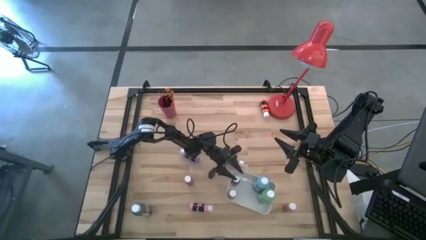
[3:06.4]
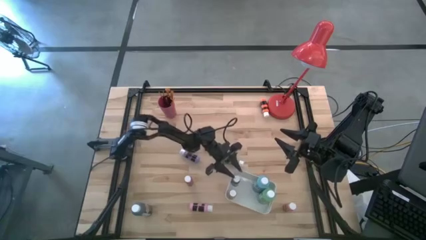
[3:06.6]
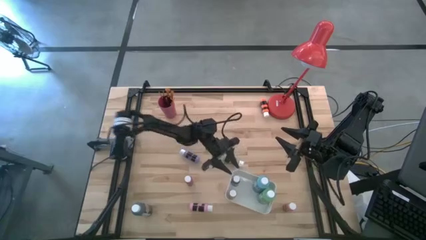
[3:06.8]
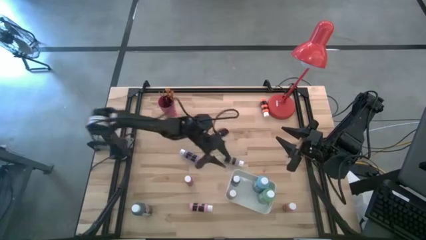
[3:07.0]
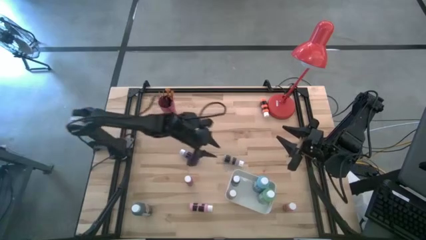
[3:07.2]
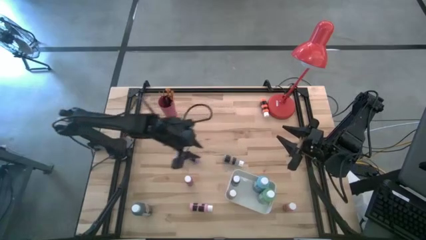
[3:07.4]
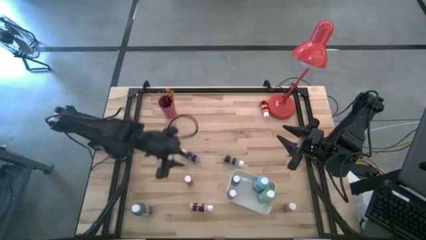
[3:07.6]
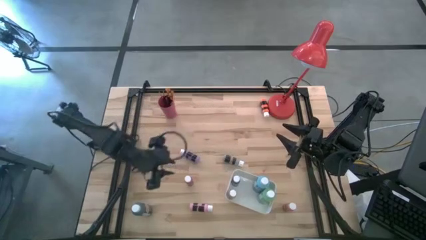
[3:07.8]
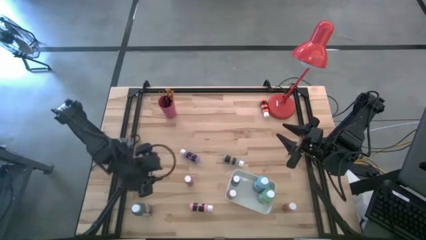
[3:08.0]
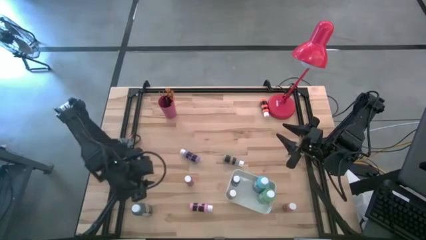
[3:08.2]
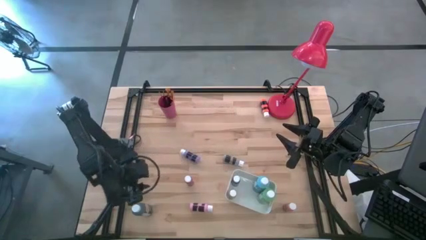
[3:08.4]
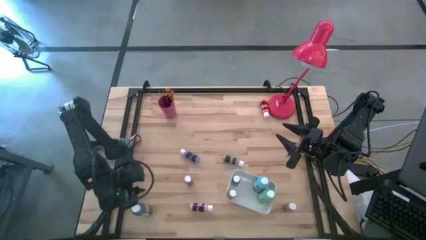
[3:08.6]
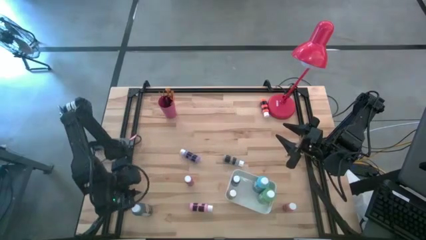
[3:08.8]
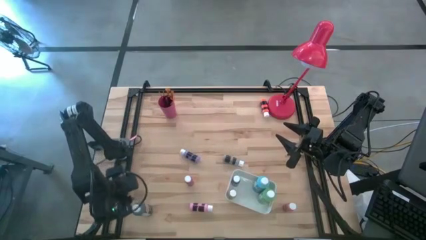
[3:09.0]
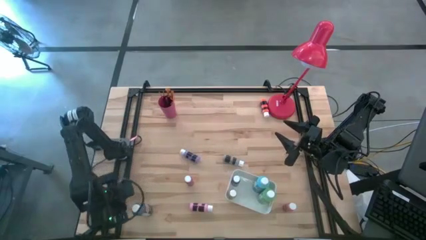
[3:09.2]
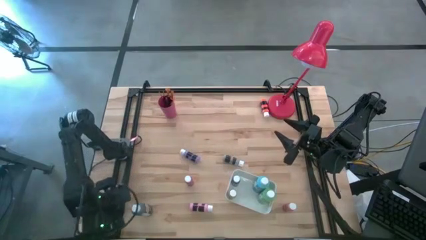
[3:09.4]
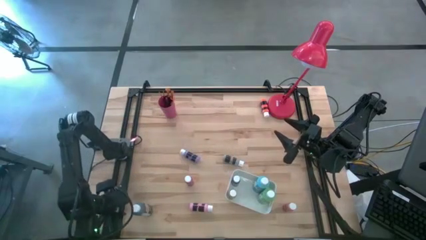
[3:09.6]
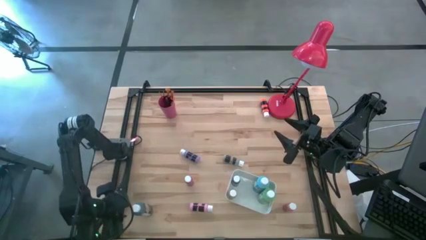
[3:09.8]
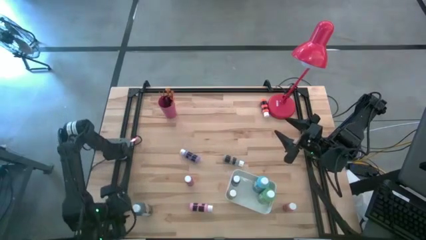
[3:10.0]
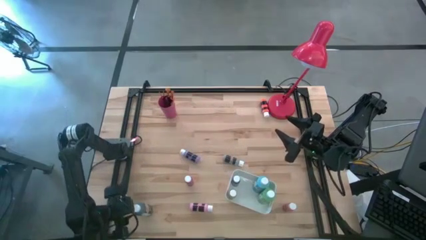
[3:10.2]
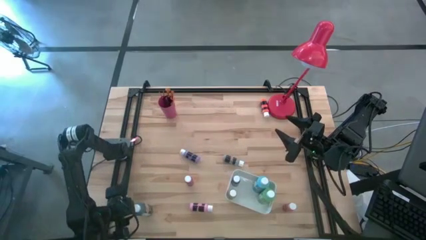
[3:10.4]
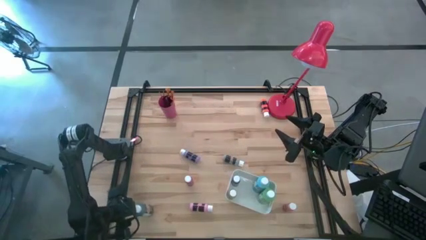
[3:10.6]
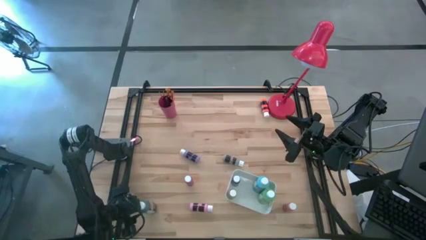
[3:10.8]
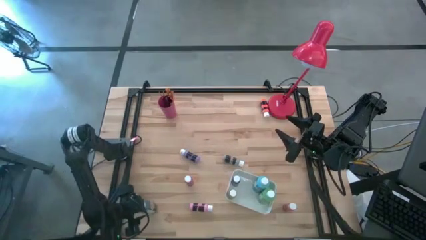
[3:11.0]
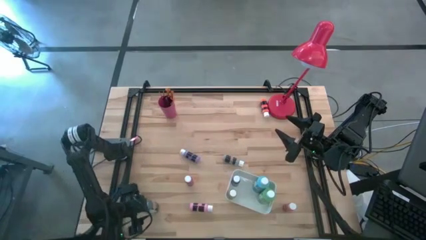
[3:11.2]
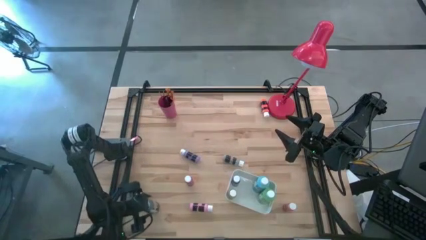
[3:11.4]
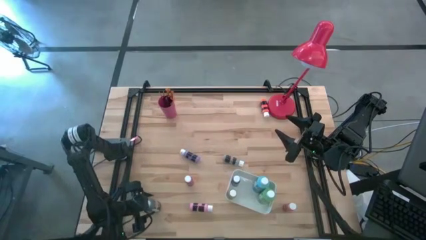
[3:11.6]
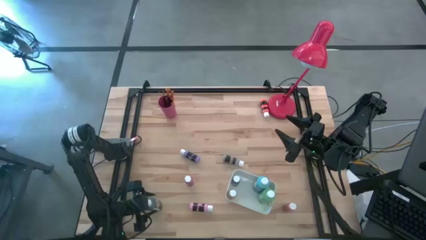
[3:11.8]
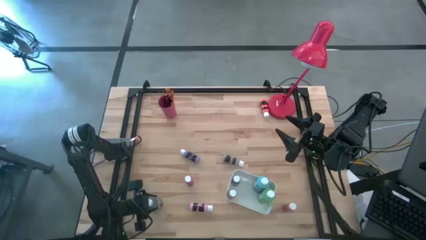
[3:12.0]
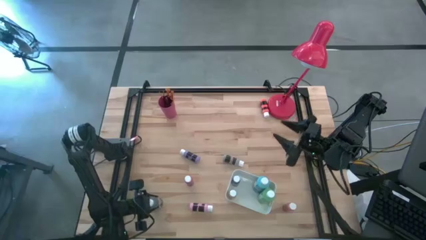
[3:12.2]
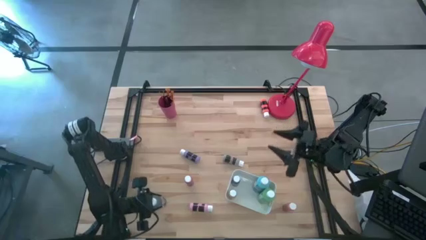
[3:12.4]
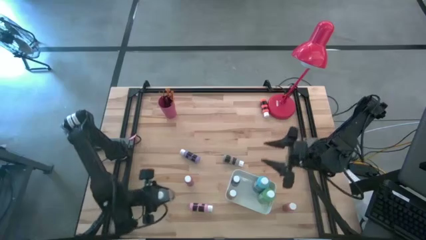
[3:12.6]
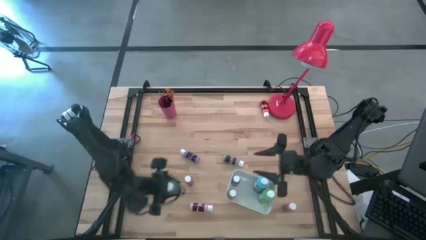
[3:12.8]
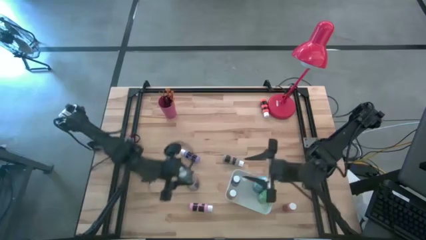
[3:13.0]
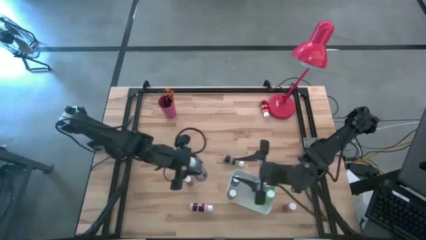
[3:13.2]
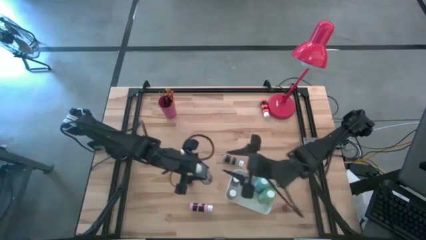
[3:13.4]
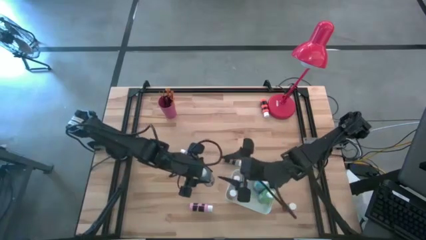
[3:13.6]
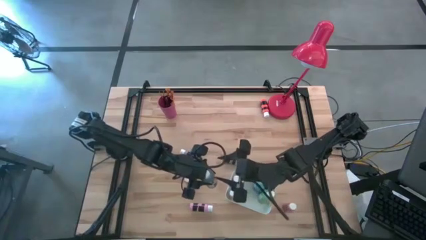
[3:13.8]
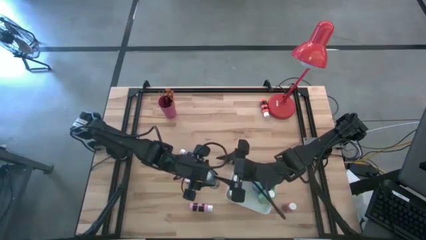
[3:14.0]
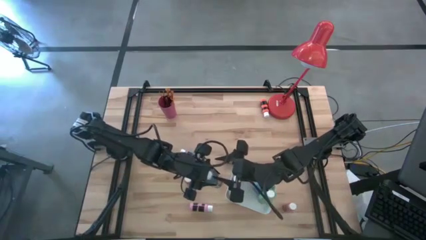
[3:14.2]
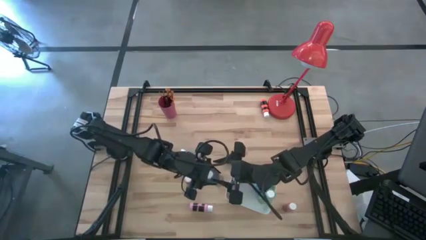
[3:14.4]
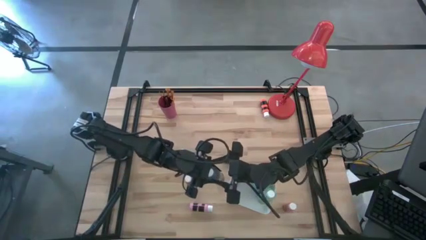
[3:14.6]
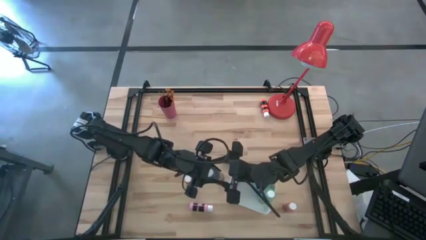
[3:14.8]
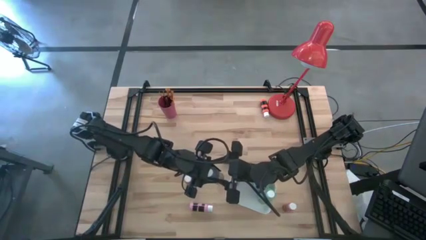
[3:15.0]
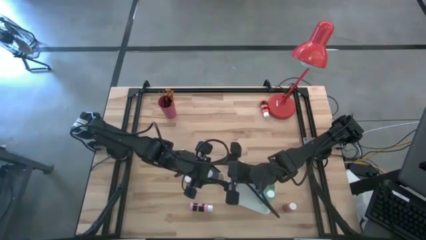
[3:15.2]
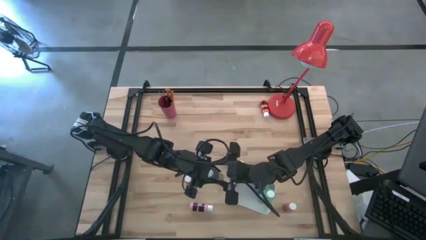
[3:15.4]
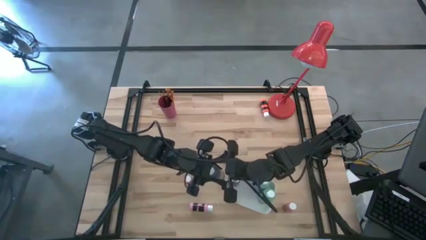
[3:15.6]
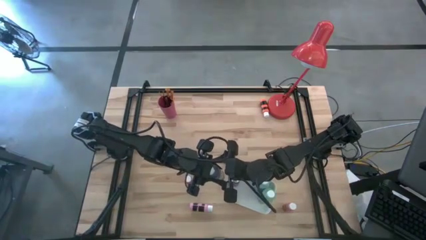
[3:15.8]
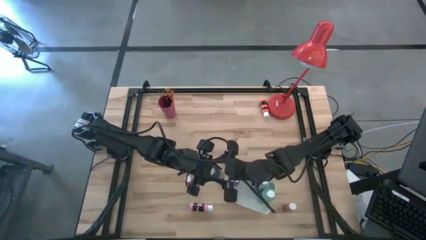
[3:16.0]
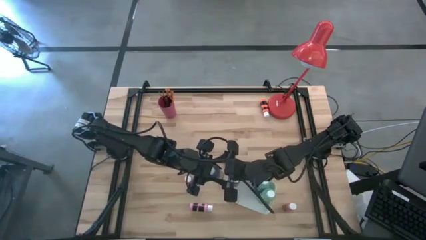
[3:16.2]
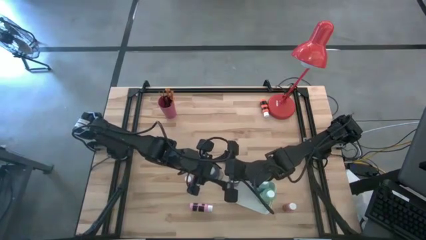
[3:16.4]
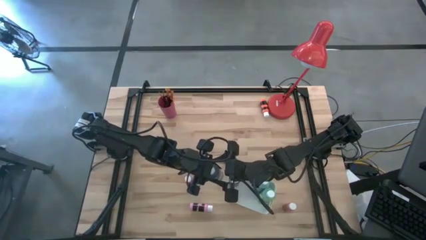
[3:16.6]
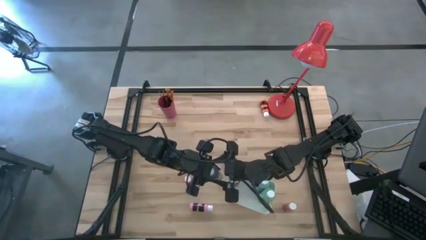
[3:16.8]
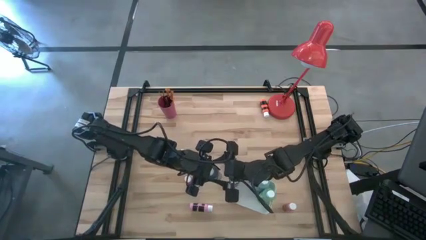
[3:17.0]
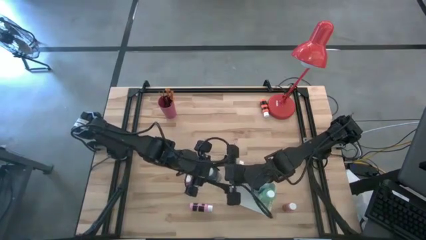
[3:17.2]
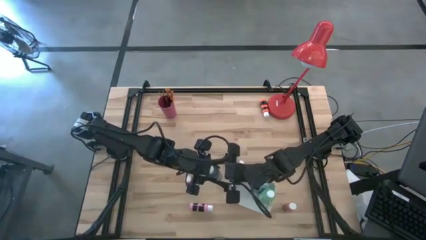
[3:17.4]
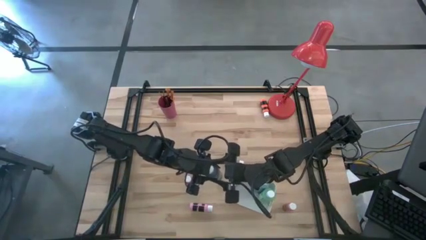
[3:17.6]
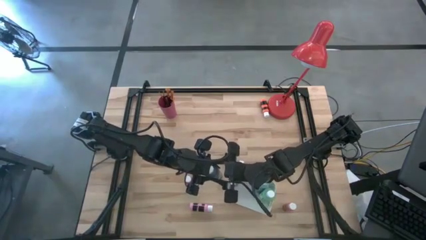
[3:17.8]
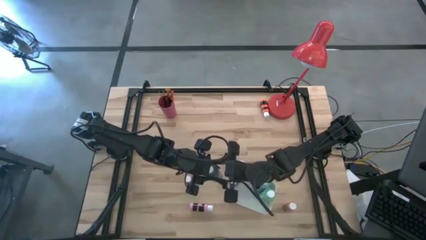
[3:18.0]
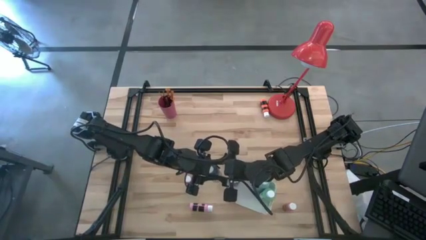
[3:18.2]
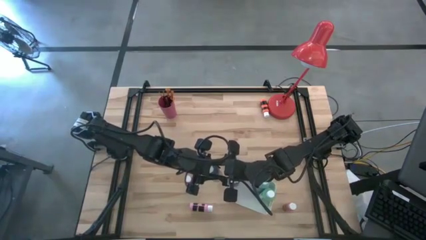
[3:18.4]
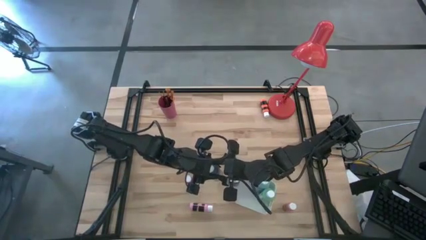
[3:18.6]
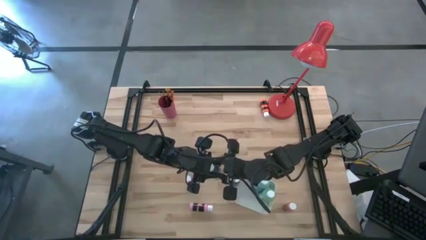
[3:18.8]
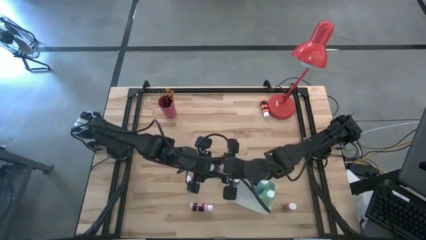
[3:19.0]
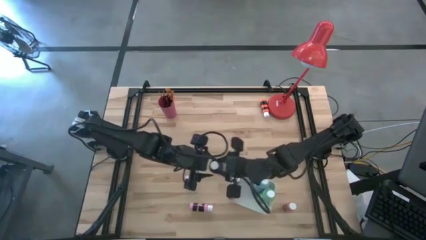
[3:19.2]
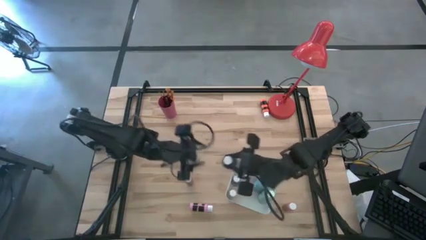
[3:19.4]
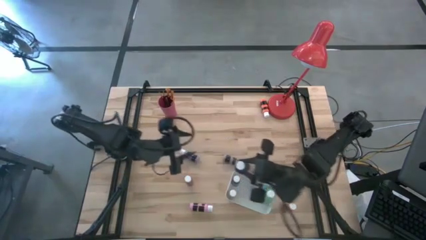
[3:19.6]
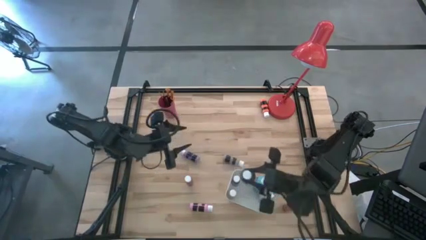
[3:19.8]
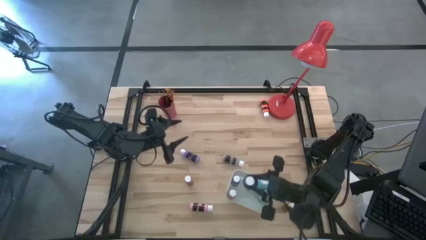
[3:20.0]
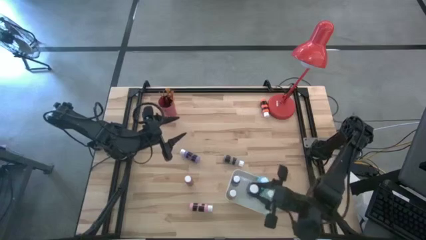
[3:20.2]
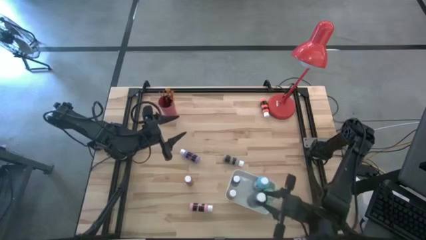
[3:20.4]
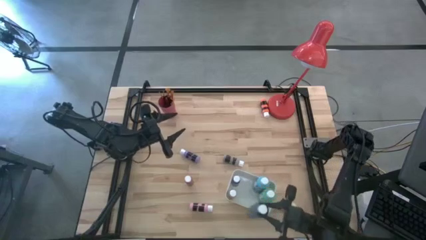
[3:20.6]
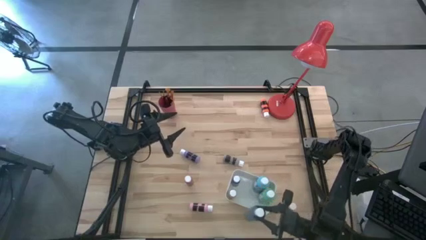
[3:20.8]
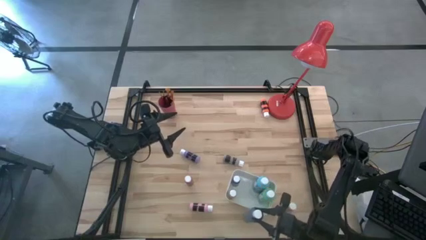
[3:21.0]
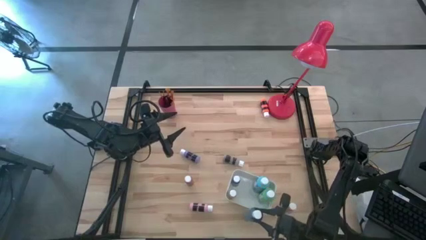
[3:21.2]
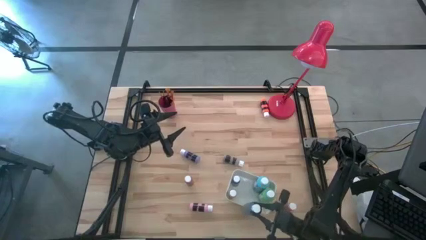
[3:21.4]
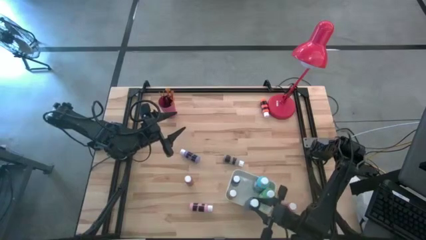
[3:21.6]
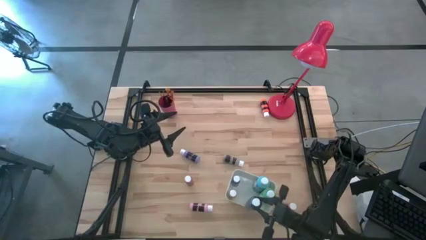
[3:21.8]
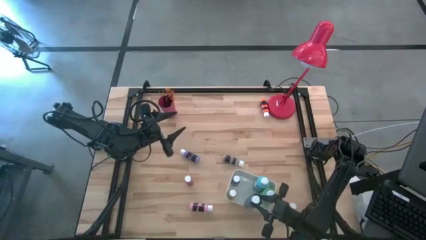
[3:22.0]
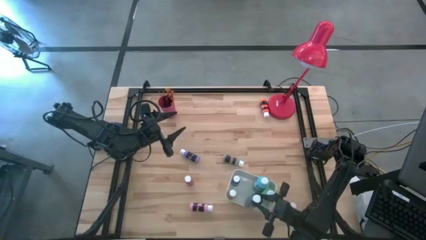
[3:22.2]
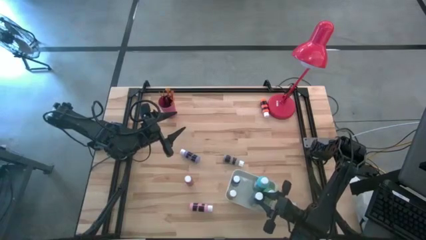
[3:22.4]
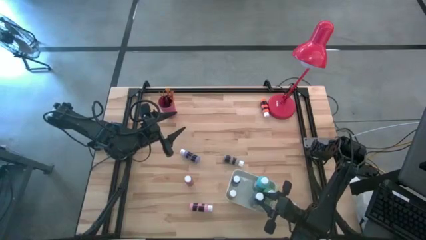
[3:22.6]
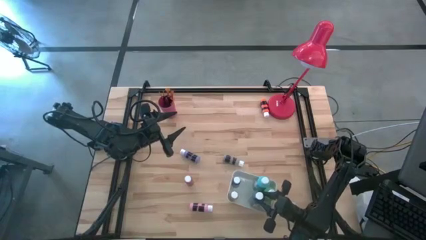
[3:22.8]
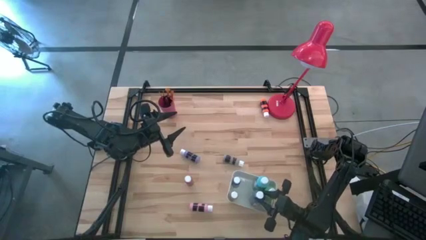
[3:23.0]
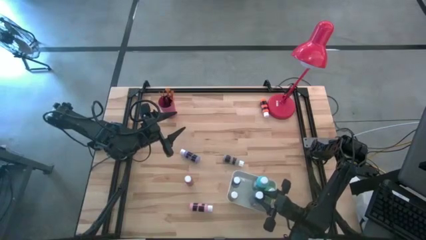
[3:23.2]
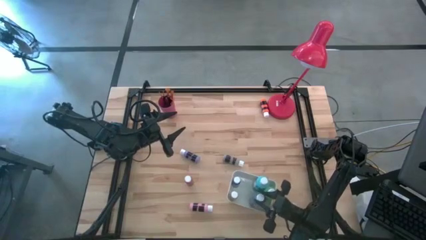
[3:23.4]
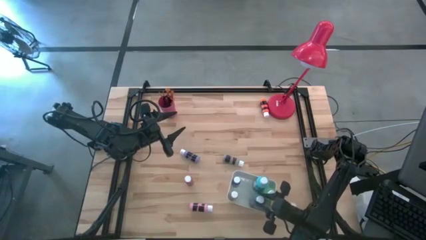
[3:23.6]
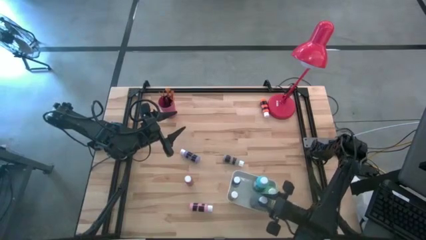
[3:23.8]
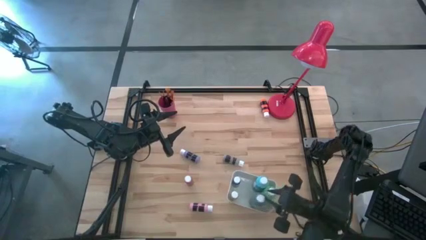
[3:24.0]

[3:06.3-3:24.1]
Task: Pick & Place Paint Supplies
Put the black paint bottle into the white bin
